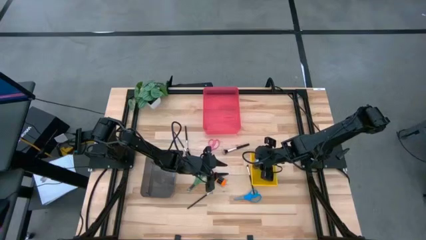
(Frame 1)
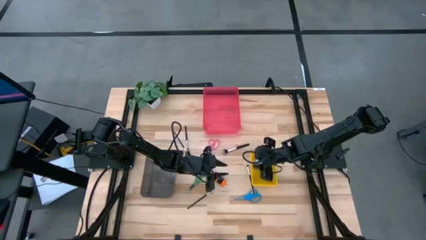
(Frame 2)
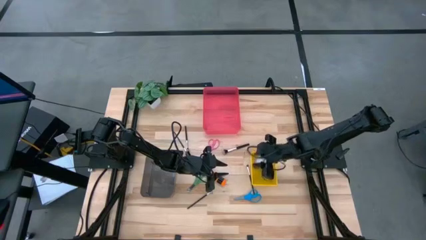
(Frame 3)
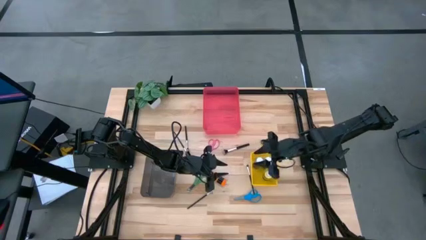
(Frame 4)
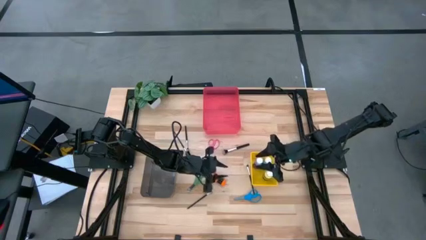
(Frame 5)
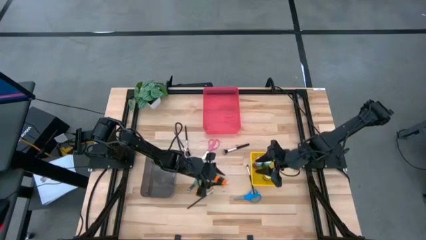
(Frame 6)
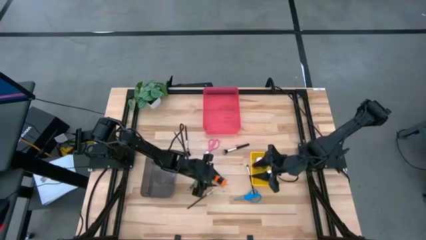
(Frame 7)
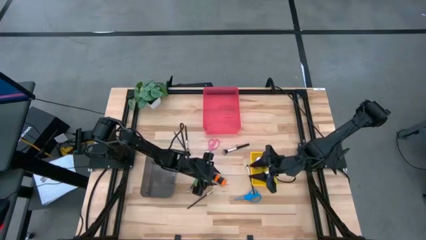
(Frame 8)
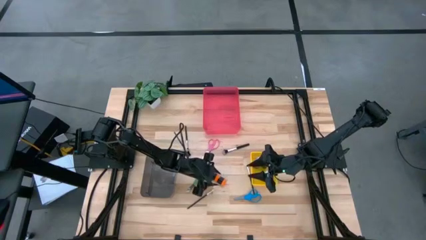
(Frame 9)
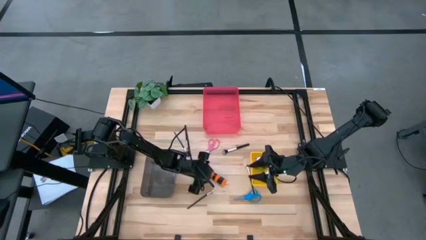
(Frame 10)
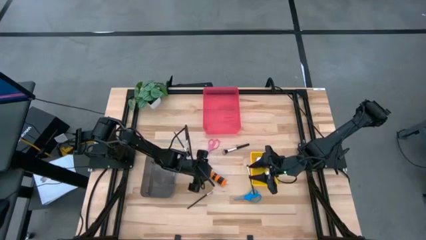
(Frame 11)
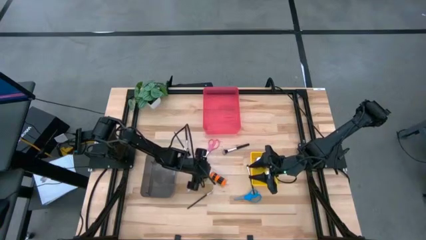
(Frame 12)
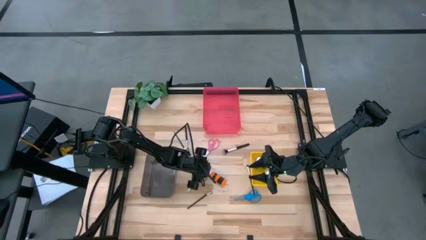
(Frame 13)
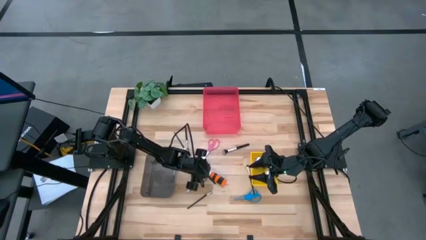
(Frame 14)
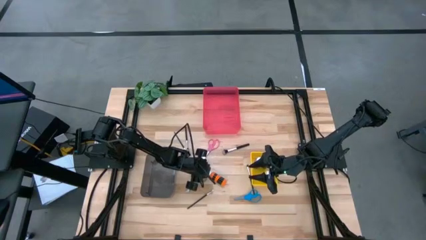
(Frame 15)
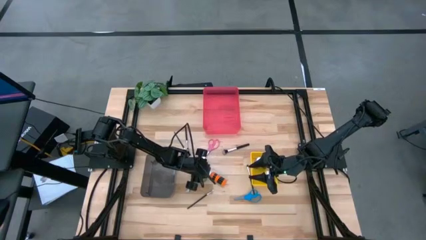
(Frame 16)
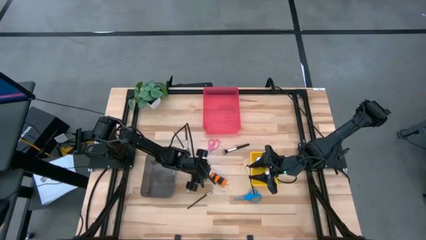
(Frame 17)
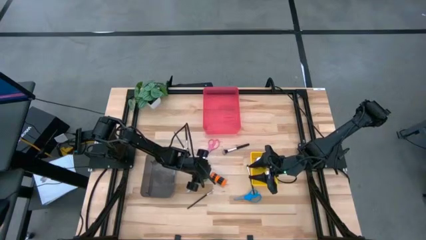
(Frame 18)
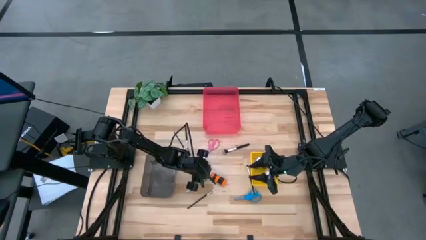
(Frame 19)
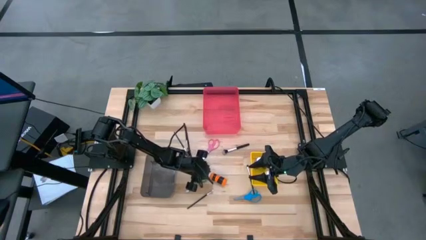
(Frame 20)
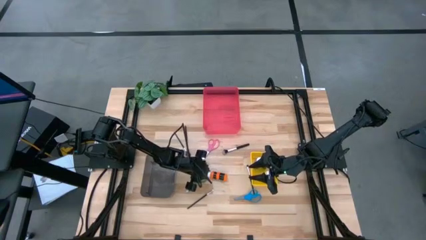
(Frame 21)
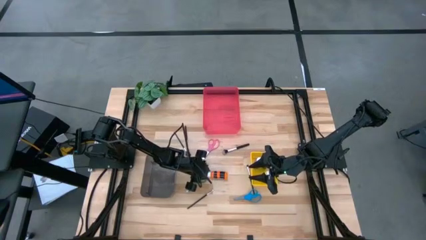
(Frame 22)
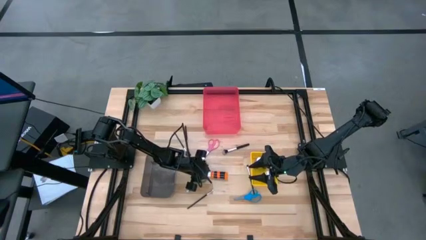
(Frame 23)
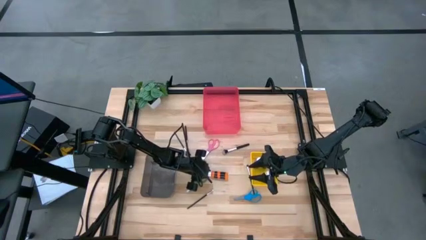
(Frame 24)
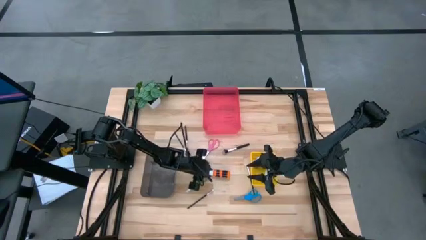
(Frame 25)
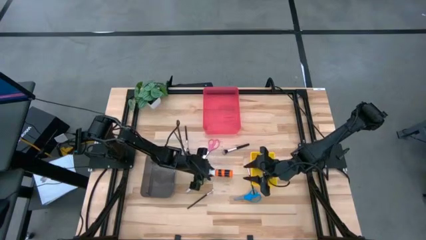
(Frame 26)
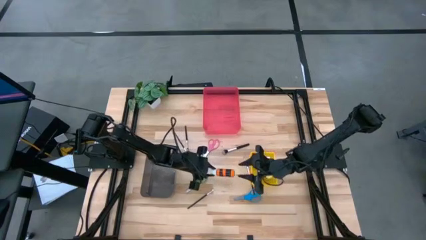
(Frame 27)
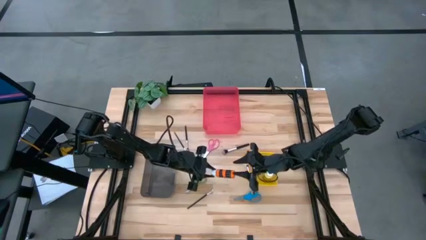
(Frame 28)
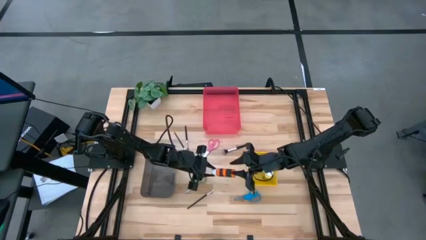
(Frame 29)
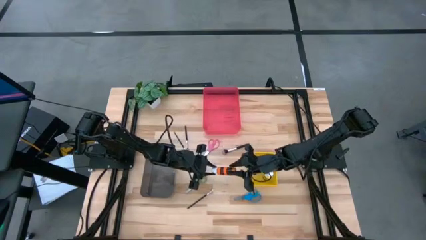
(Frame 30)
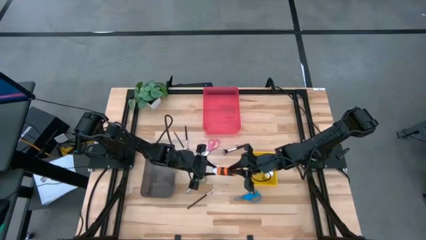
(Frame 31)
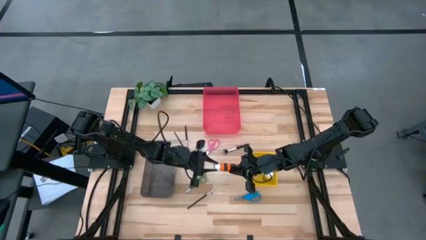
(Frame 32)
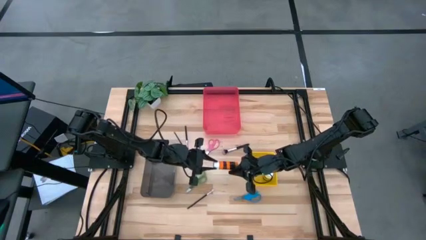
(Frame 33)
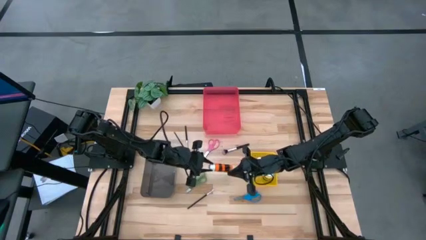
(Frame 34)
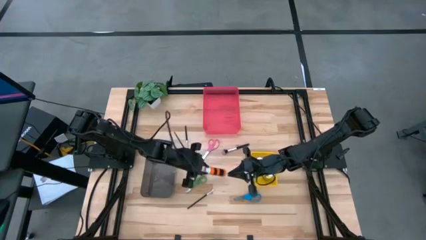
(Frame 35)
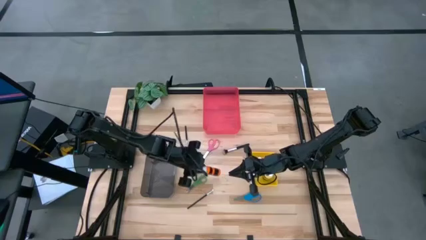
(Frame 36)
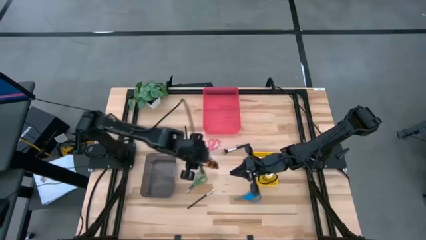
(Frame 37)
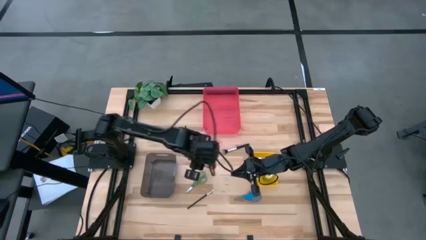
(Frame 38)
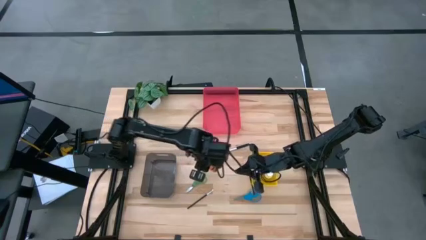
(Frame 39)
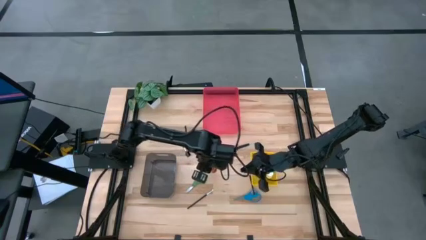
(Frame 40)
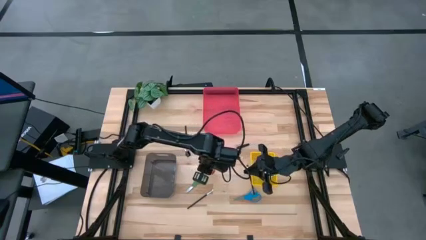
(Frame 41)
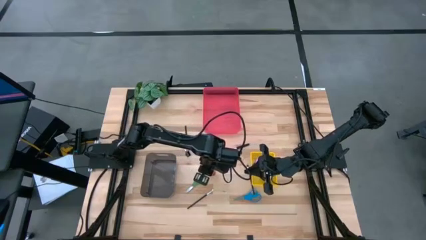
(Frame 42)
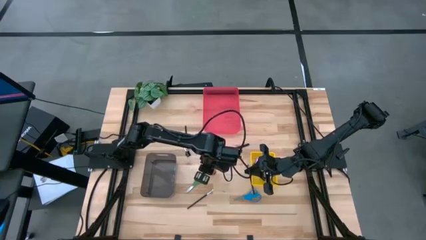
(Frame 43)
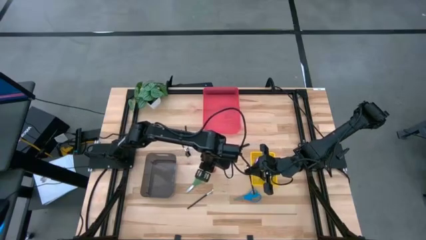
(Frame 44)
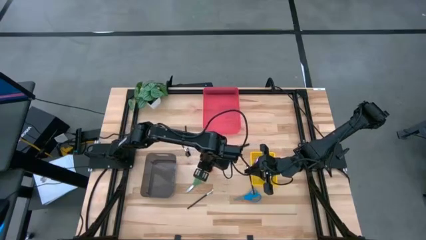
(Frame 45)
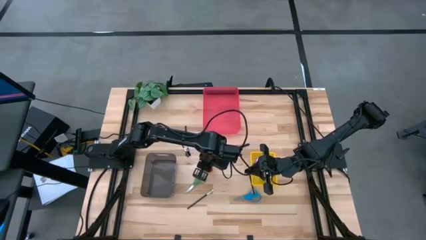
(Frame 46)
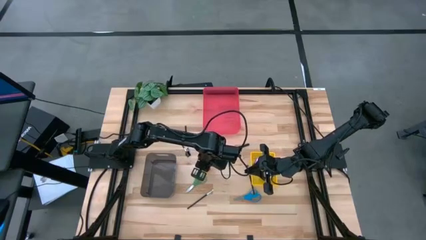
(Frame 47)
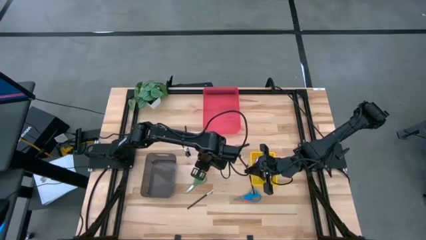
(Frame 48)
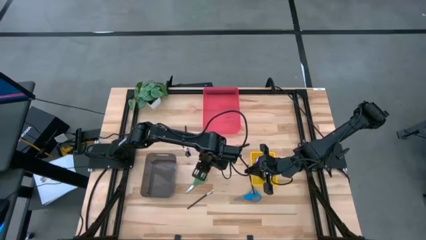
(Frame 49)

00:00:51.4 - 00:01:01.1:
Task: Pick & Place Paint Supplies
Put the orange paint bottle into the yellow bin

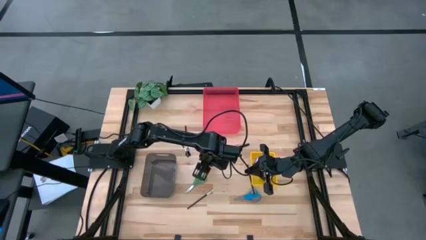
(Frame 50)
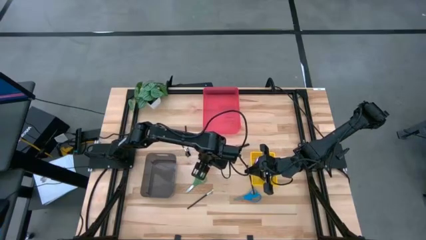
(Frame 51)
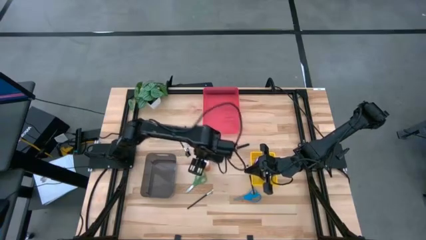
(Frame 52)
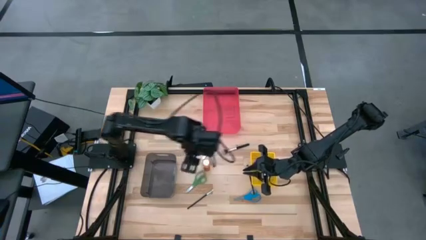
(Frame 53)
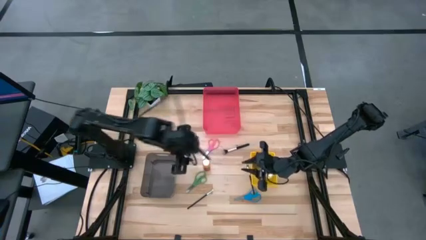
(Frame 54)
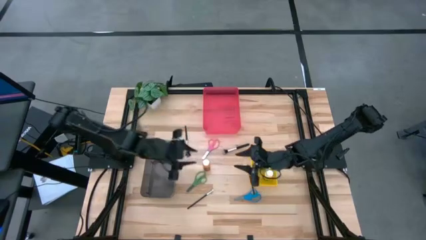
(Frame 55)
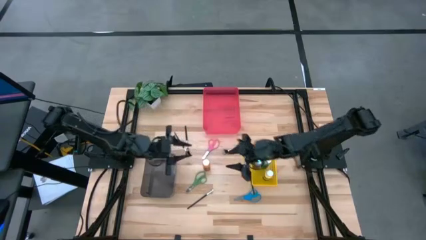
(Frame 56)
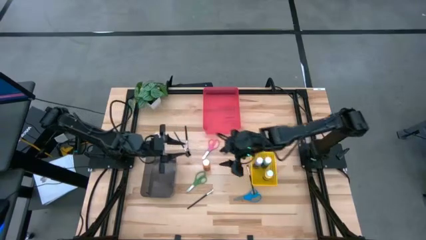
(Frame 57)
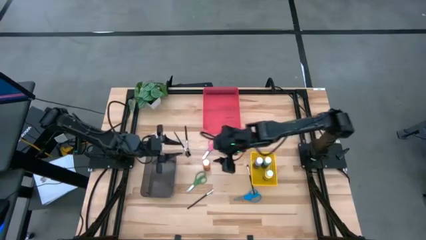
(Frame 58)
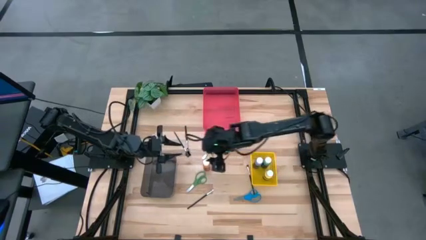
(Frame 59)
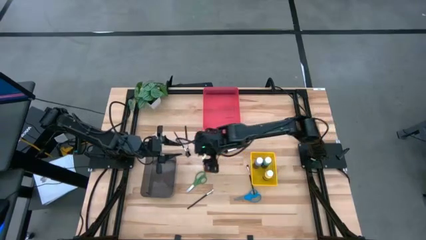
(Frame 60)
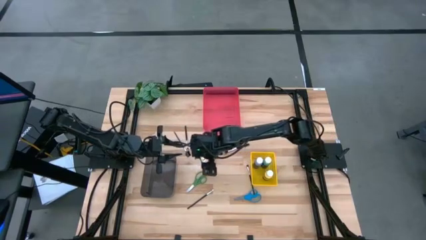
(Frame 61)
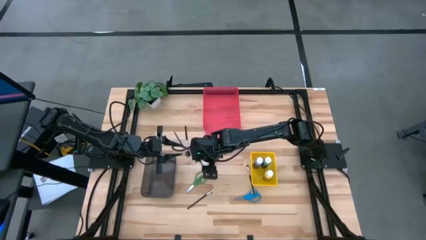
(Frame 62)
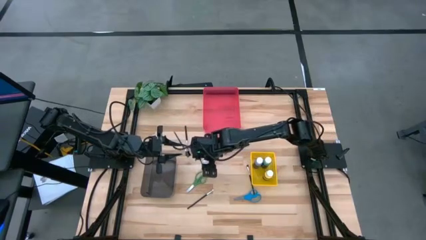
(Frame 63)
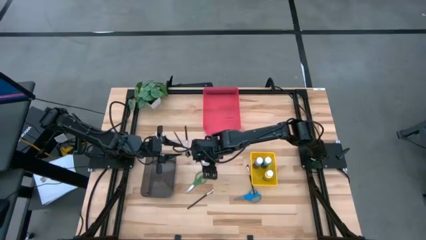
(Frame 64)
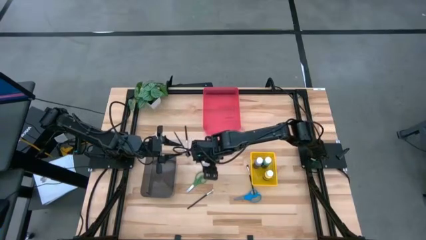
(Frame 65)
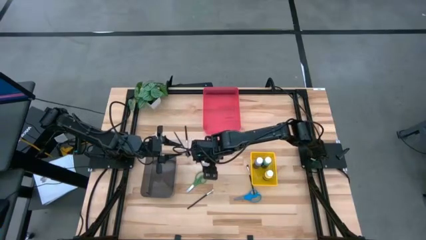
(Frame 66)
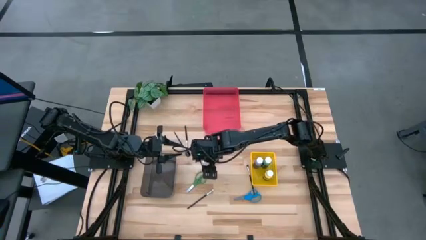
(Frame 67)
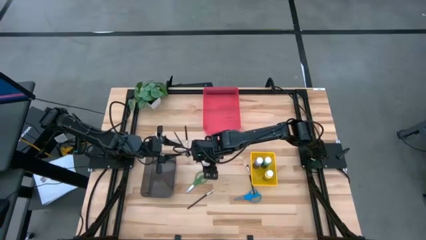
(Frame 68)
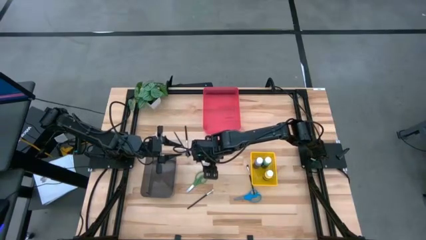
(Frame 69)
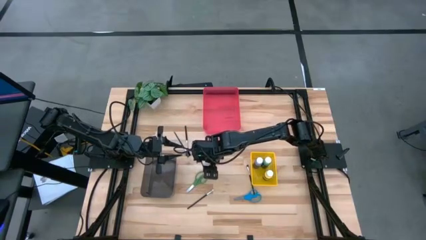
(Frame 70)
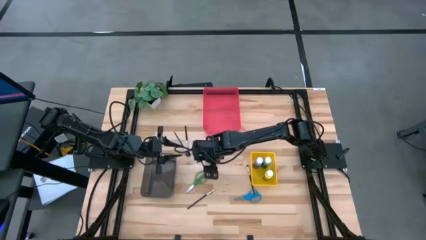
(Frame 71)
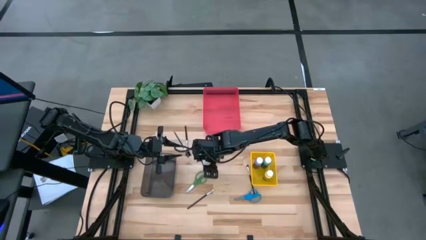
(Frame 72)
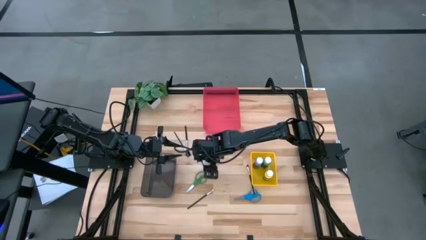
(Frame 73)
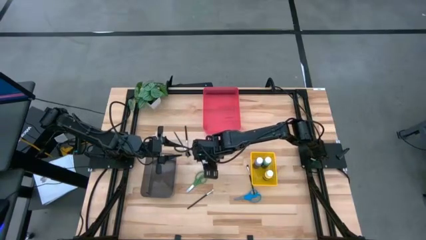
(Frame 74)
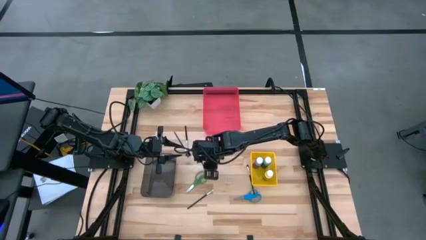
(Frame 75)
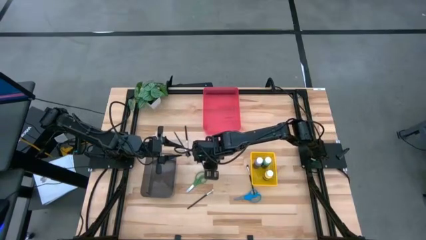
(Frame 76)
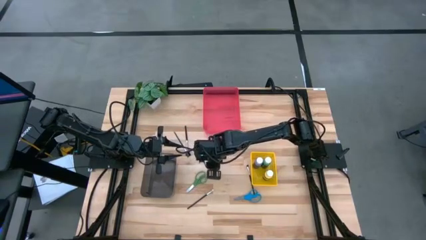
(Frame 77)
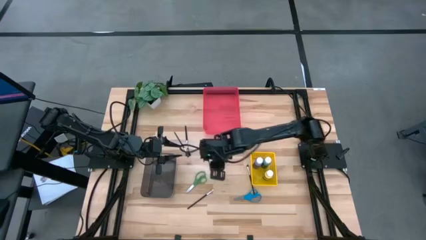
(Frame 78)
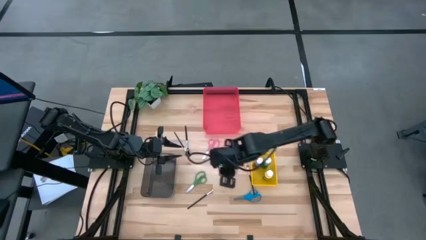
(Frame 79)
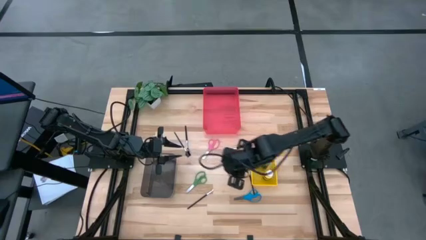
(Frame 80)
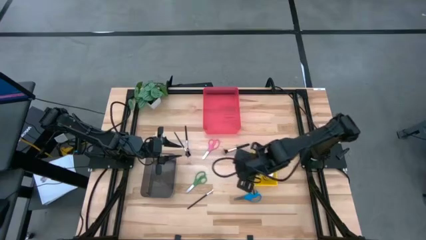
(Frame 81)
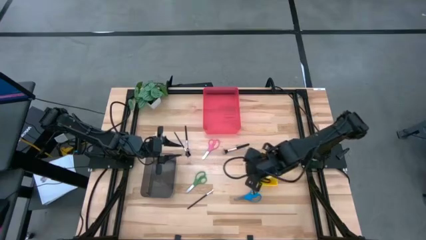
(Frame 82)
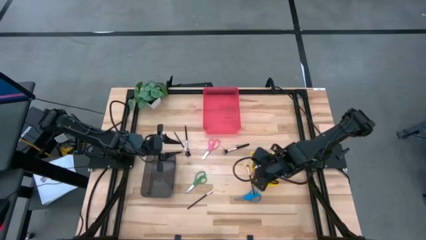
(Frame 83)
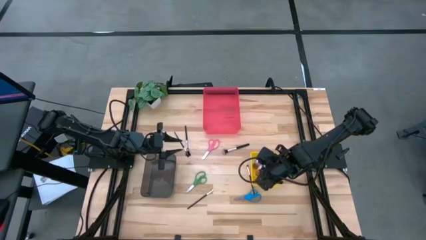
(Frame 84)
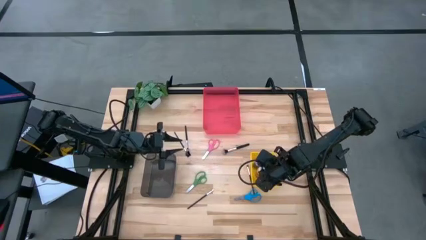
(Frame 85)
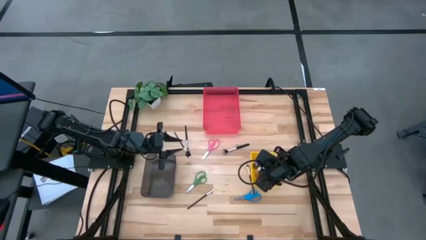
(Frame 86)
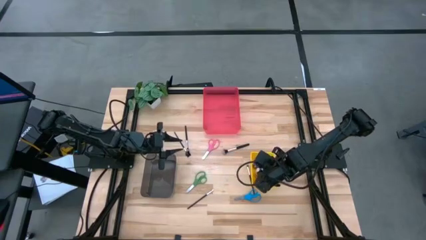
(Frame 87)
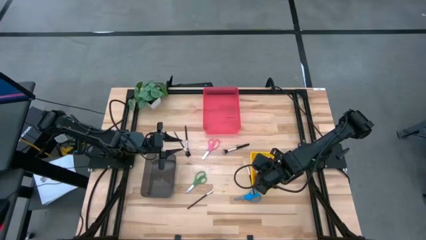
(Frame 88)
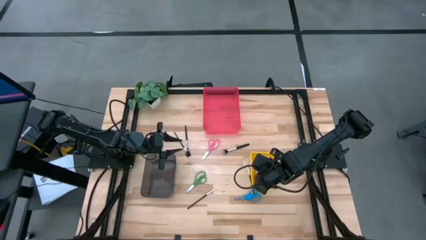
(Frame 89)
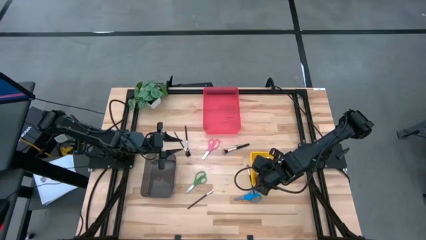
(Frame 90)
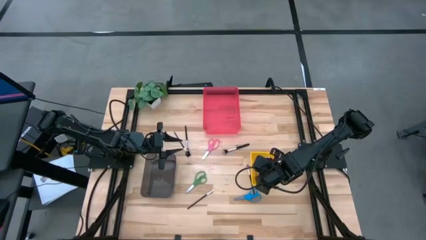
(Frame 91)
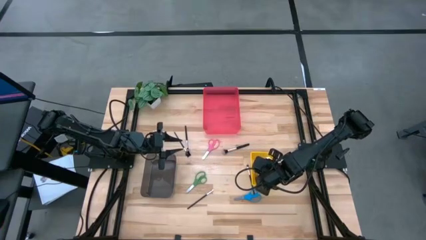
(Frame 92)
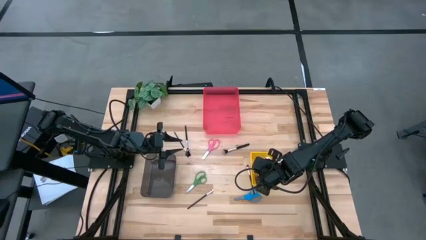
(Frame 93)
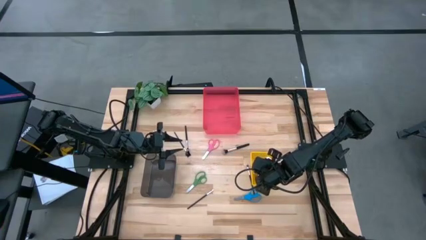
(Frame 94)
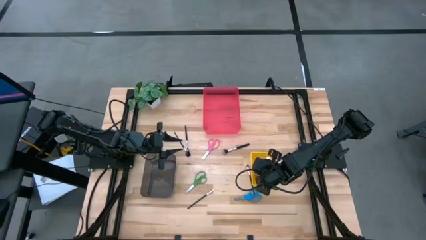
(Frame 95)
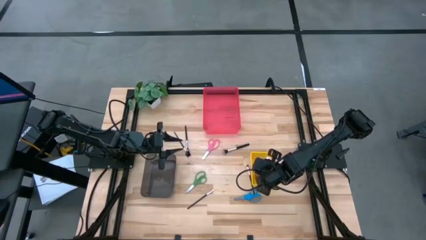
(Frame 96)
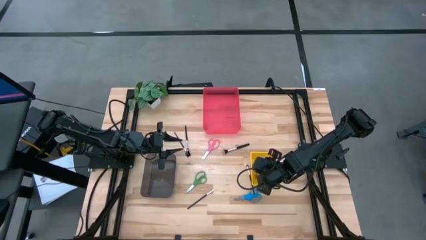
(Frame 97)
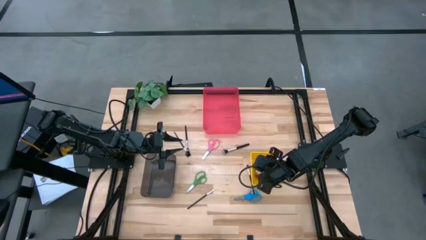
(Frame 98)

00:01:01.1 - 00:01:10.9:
Put the orange paint bottle into the yellow bin
